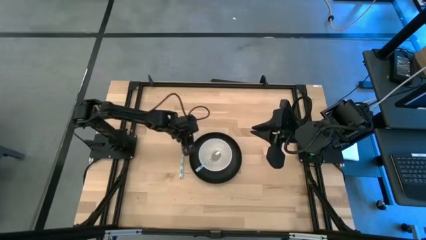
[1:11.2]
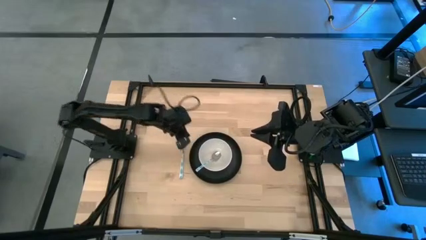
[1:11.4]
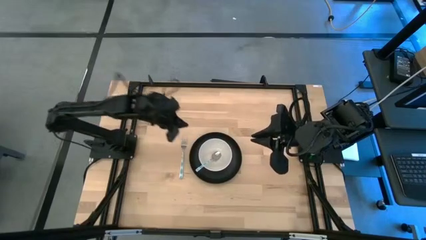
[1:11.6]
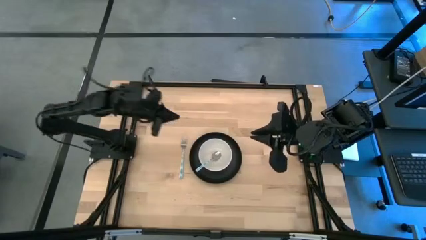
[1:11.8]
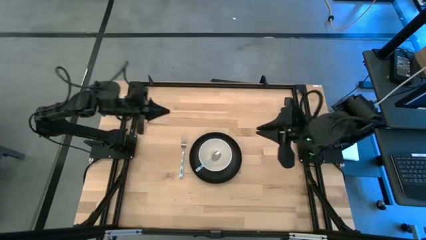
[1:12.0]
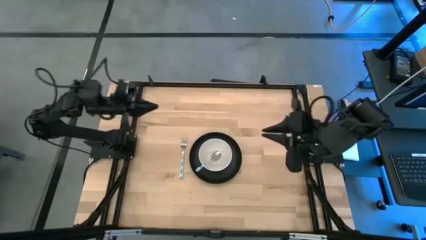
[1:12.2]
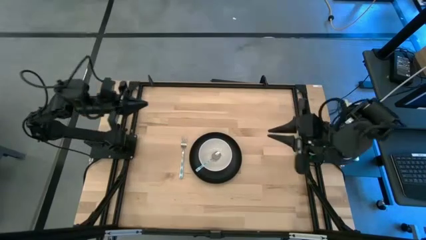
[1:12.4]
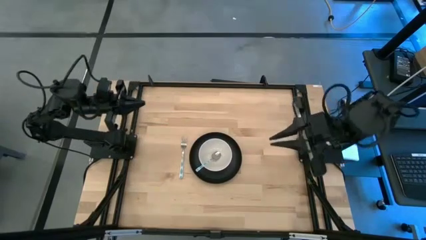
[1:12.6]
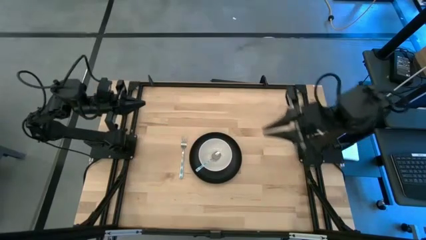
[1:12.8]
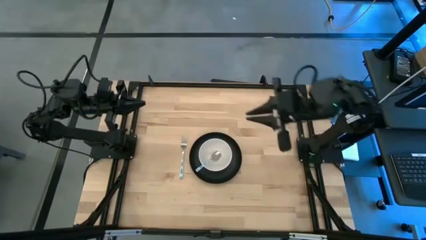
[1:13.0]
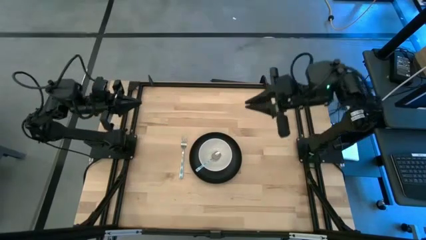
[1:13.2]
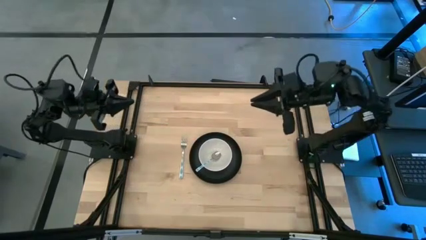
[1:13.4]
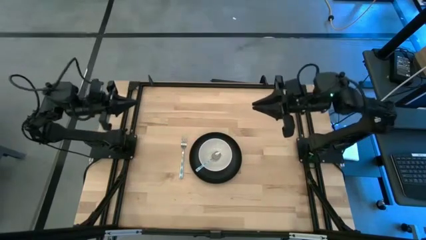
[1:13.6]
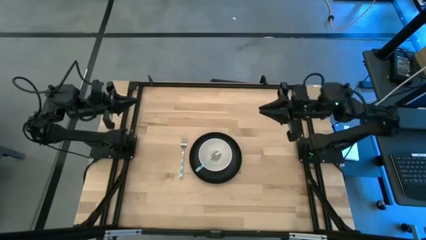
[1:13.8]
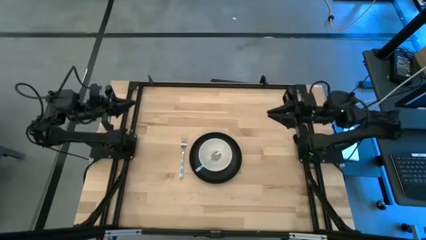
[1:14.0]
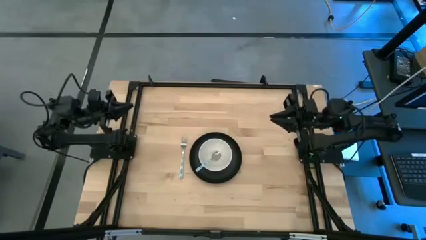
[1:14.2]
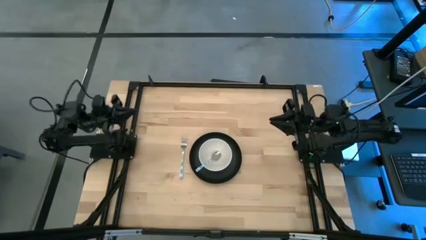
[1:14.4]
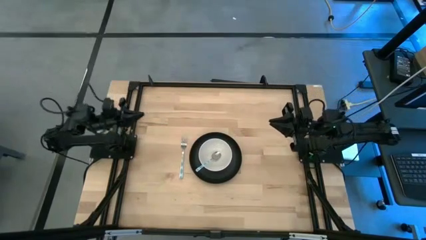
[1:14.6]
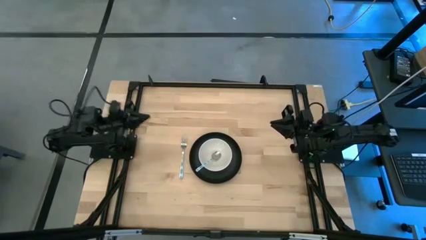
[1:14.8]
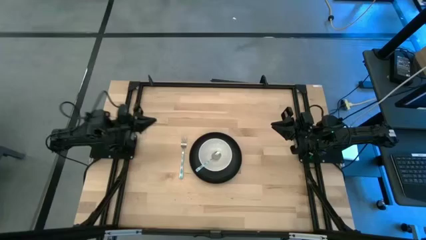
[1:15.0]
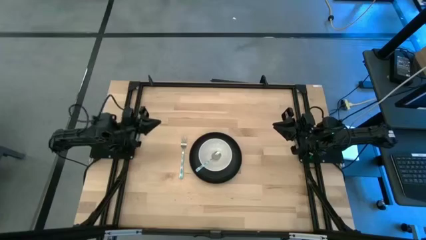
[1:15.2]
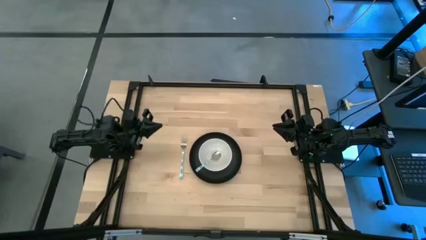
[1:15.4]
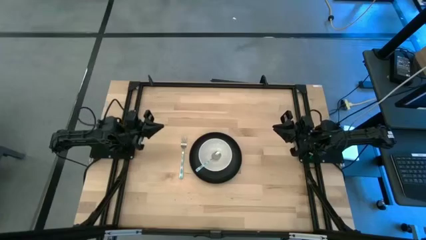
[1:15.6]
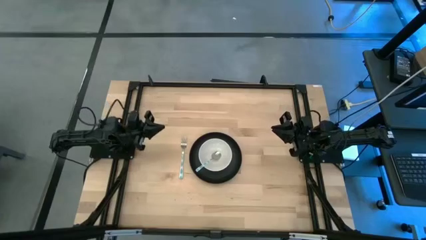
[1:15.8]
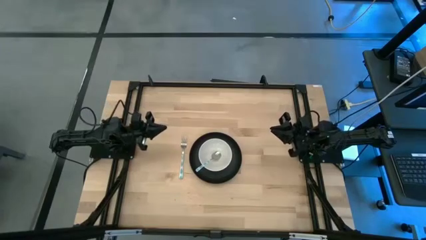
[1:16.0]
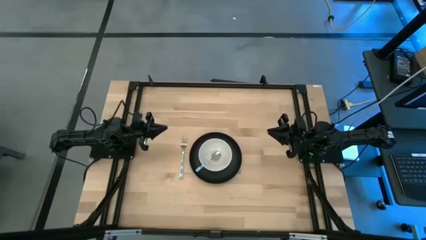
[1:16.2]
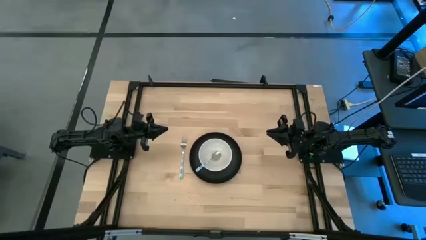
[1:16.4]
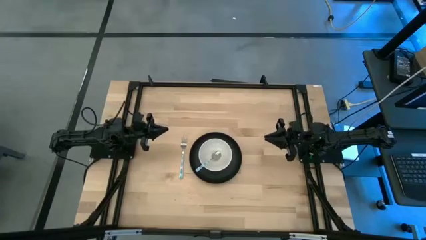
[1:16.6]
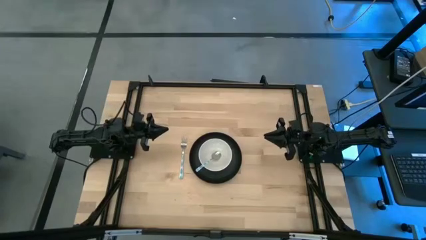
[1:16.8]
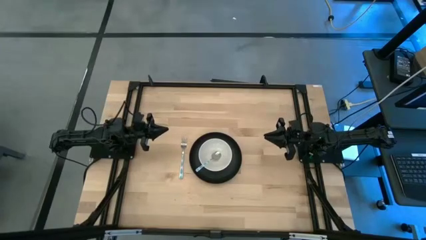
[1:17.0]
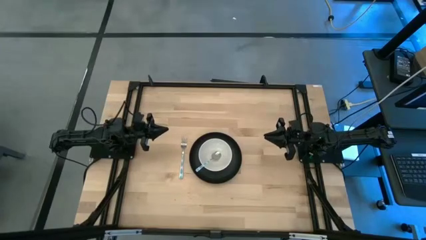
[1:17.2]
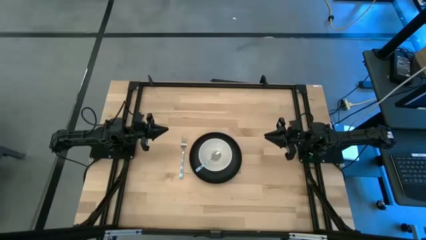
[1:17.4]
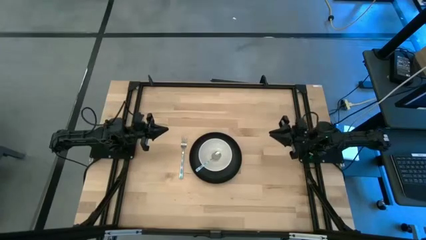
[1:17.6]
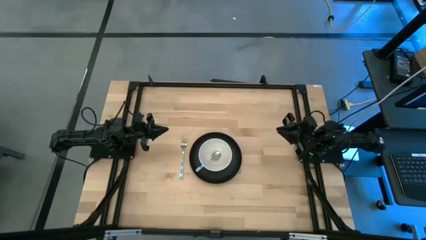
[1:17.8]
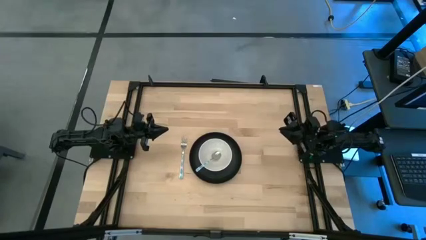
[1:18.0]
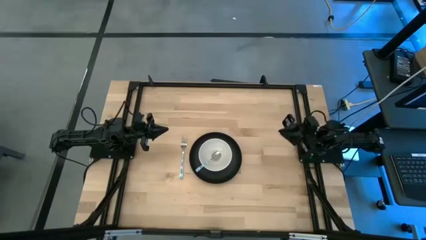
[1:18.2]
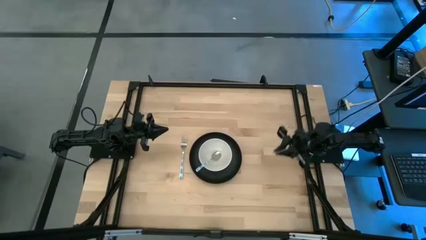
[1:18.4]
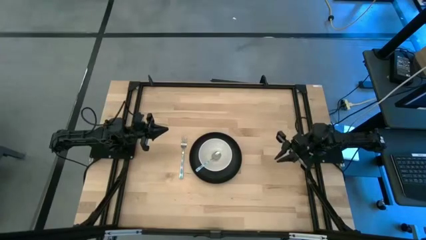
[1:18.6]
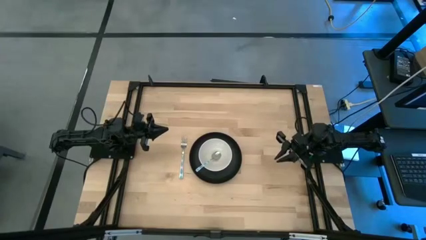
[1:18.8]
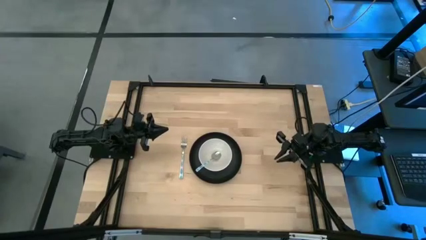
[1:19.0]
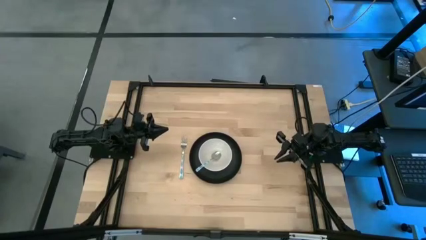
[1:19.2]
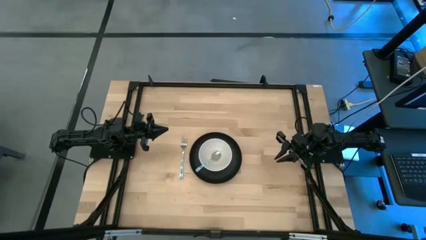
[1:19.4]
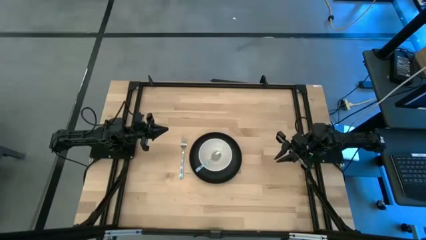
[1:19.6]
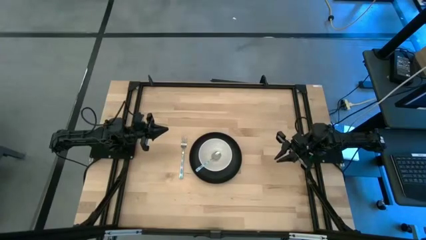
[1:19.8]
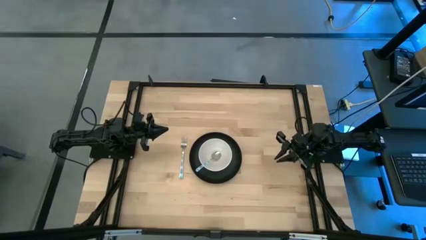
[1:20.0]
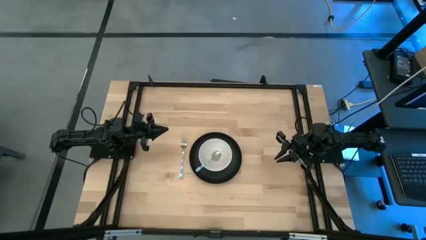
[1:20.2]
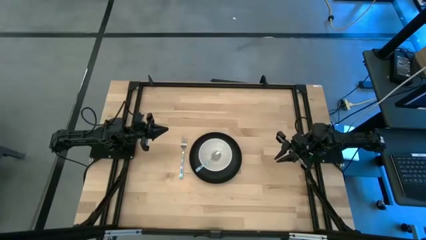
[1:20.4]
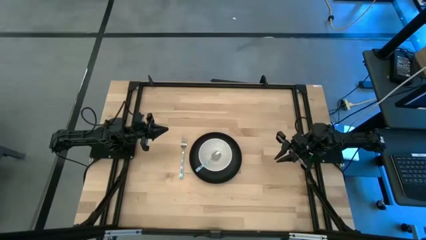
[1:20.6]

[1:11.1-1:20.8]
Task: Set table place
Return to Home Position

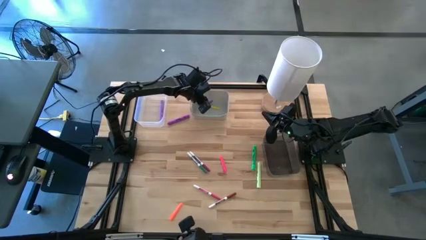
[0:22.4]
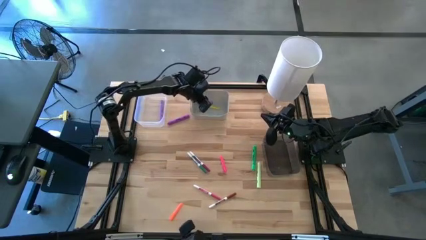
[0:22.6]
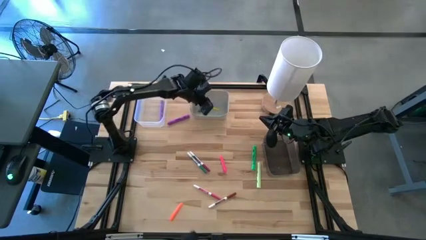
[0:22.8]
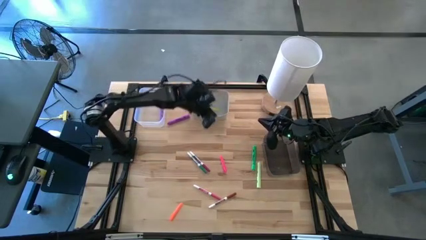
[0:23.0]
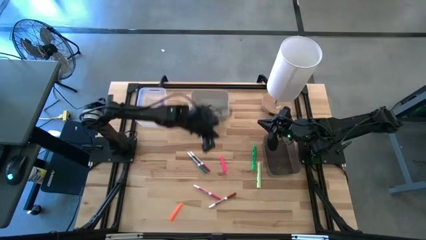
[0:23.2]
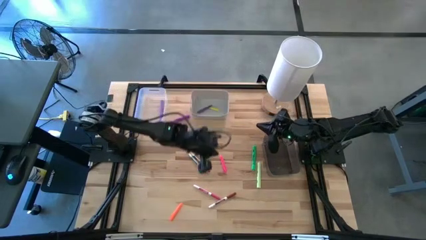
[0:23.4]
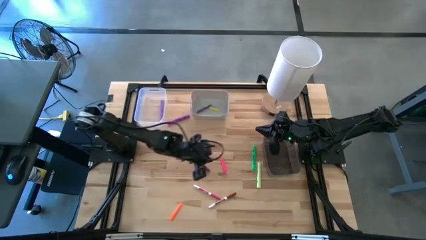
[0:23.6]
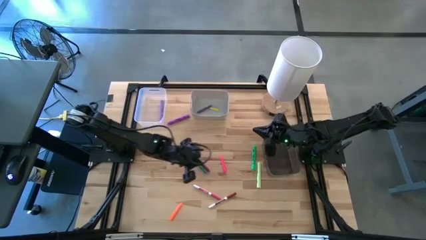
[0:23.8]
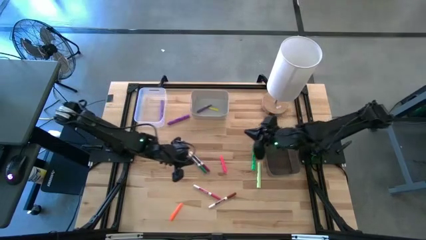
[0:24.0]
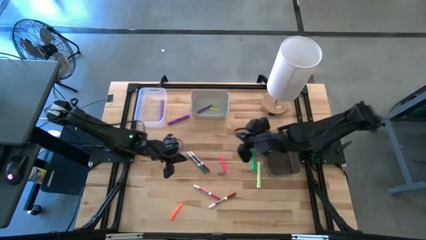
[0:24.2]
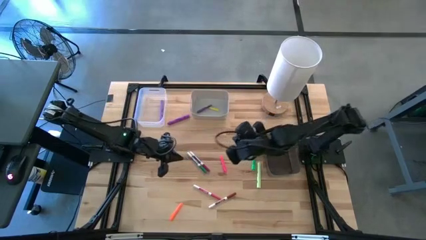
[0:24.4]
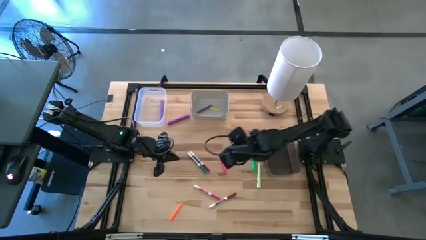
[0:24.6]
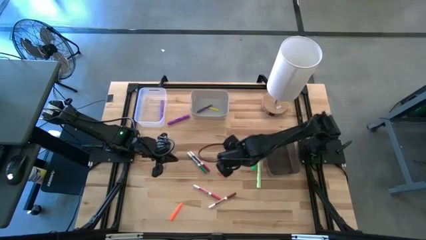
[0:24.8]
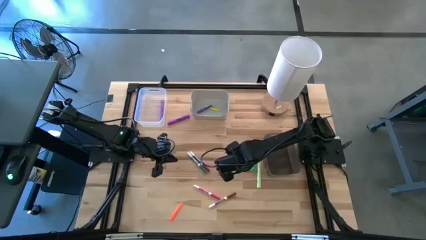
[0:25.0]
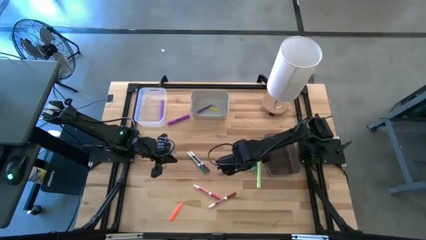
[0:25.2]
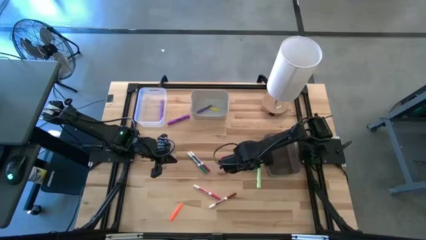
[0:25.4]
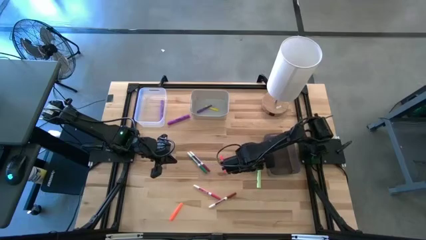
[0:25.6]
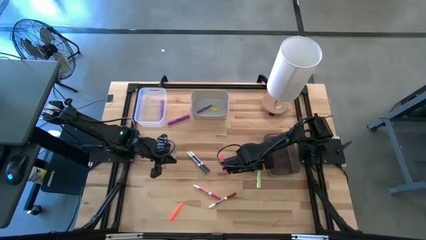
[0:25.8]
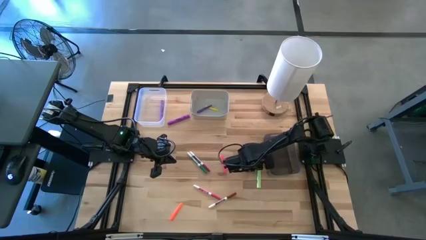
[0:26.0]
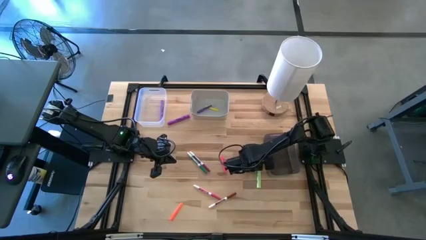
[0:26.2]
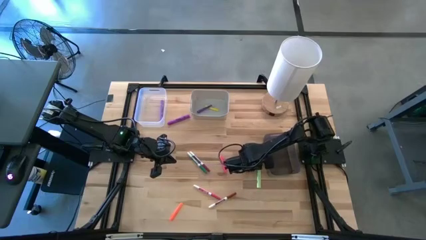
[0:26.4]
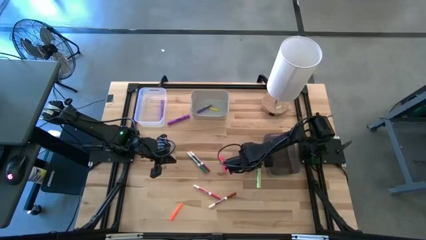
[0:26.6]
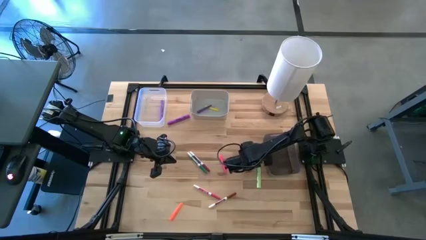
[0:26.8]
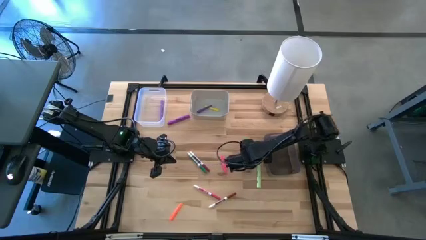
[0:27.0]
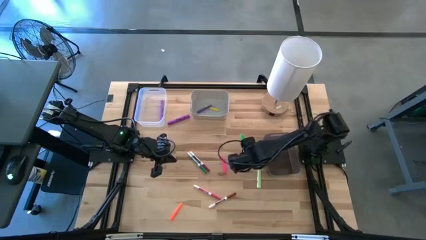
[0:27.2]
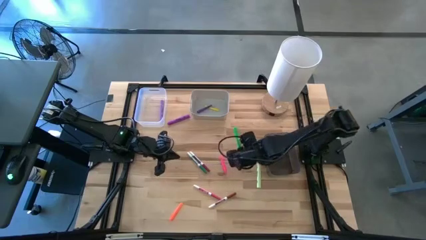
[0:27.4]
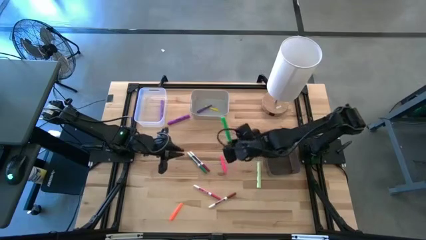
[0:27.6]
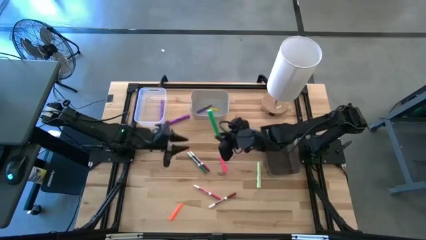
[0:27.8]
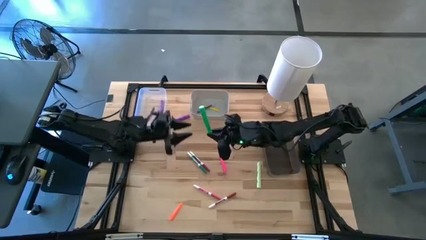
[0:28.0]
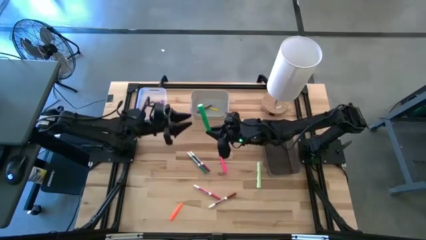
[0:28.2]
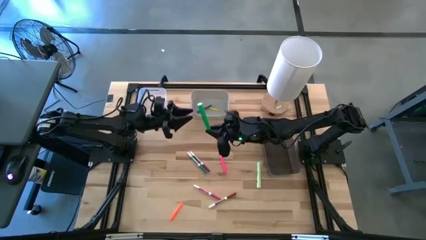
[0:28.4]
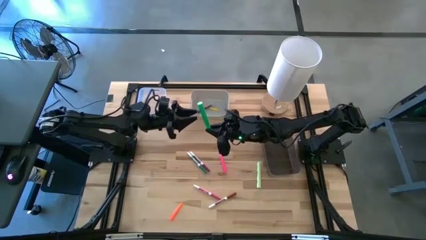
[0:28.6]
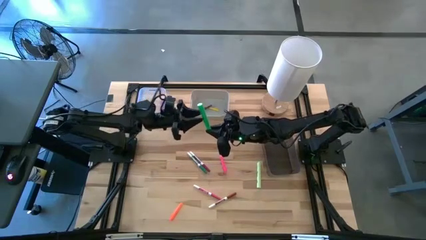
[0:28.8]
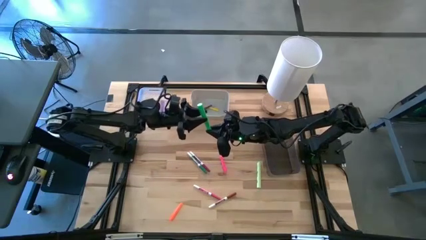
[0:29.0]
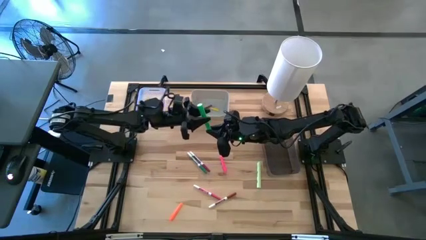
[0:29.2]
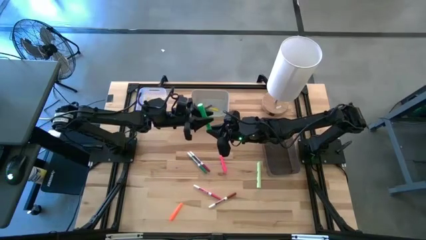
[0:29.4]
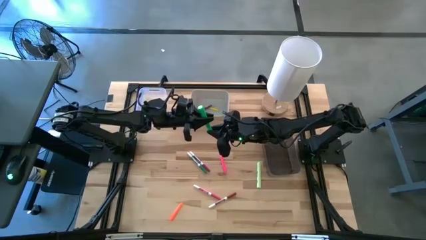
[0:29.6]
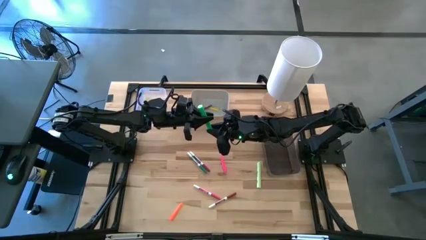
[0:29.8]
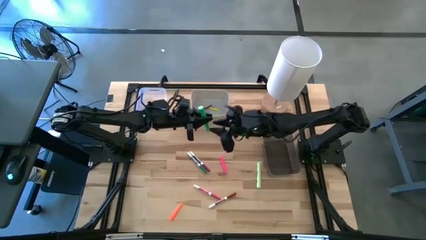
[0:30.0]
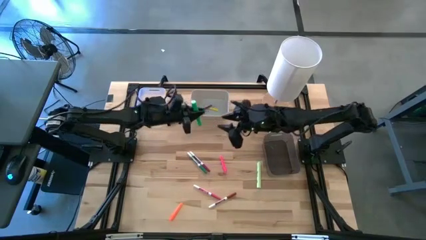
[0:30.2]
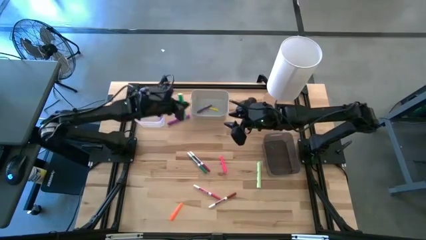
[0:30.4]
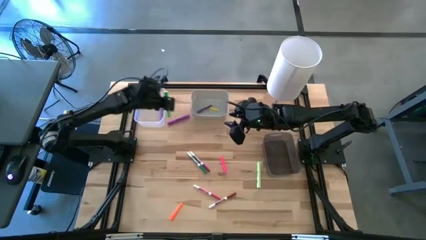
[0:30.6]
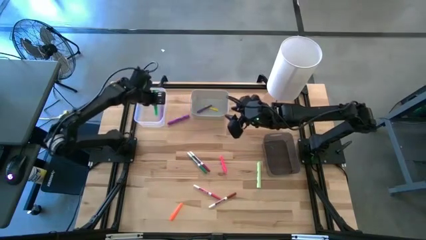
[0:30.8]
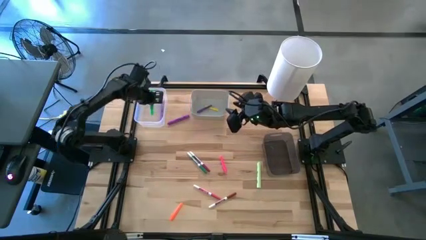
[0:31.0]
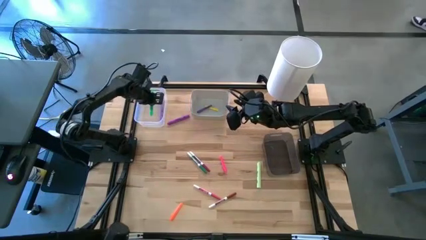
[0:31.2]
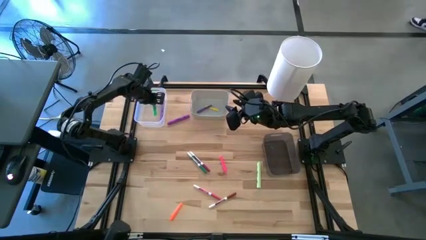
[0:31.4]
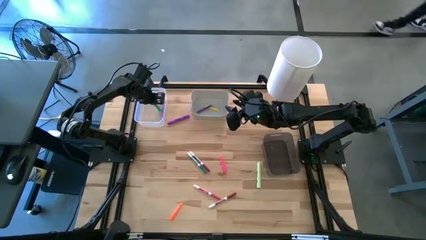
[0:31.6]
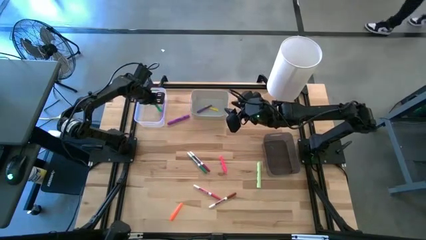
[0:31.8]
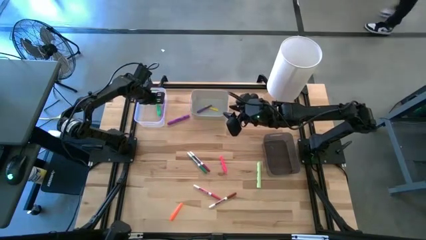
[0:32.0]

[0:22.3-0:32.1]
Task: Pick & Place Markers
Put the green highlighter into the transparent bin
